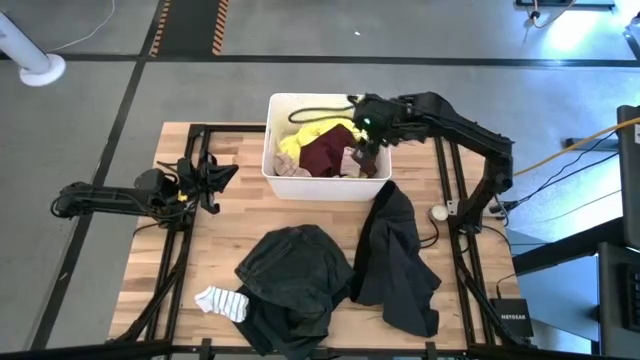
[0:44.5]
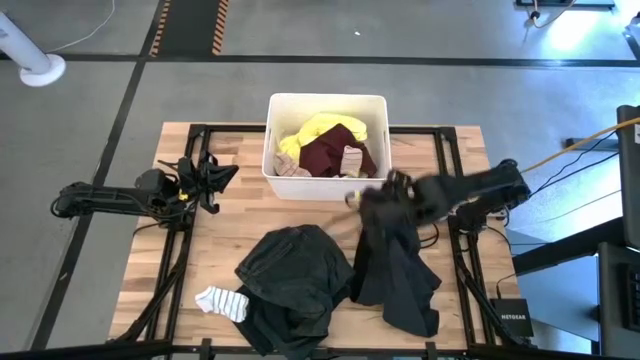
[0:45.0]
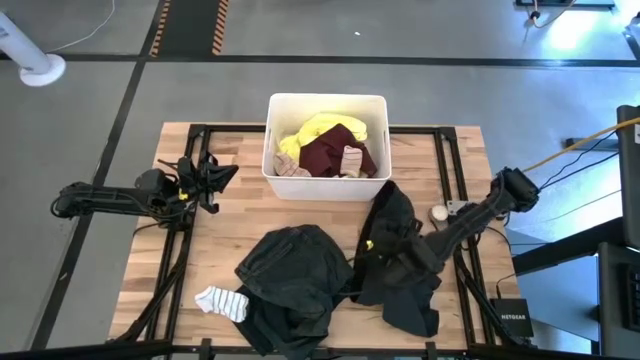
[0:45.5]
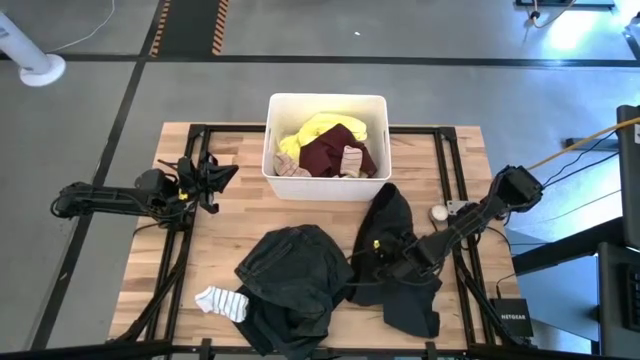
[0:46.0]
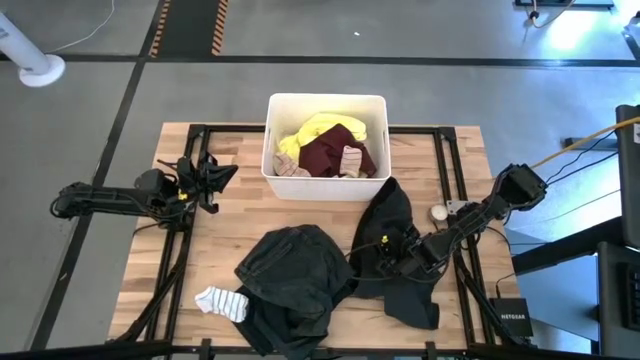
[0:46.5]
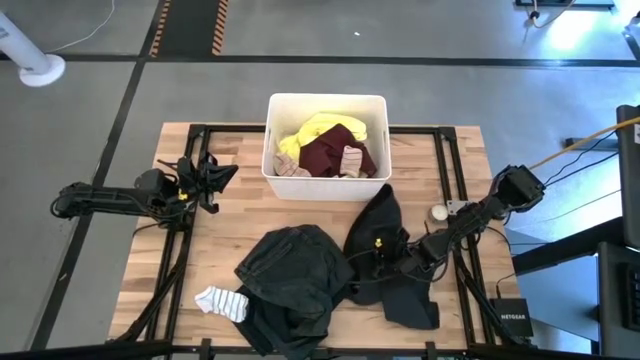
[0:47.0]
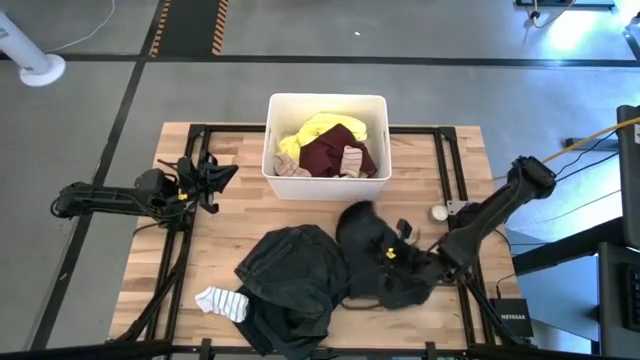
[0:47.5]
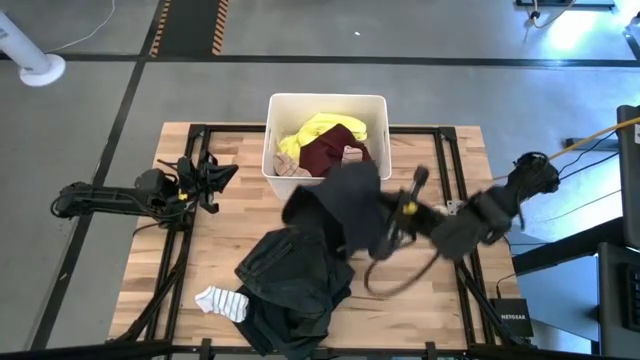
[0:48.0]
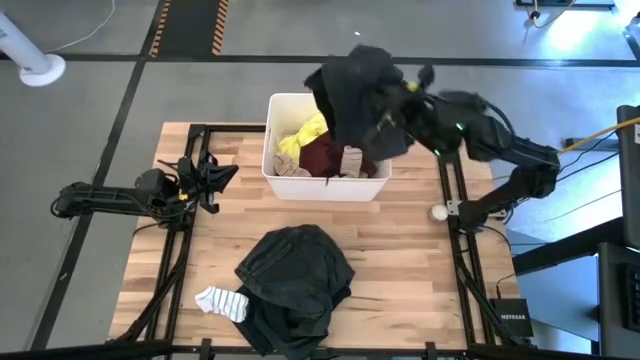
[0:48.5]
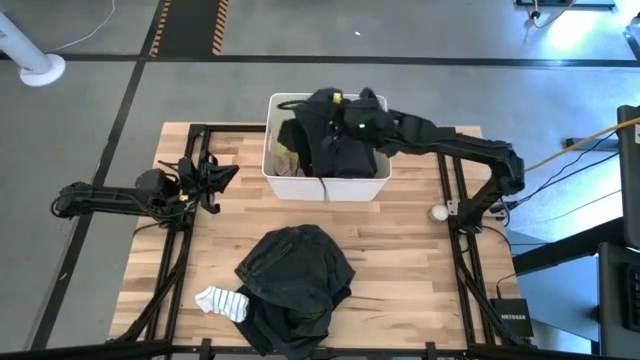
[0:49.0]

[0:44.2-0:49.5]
Task: Sort clothes
Put the black shorts into the white bin

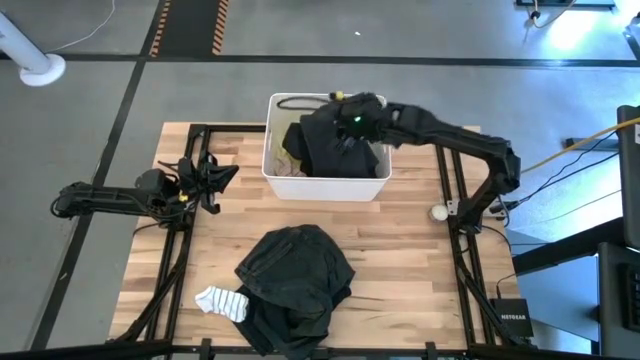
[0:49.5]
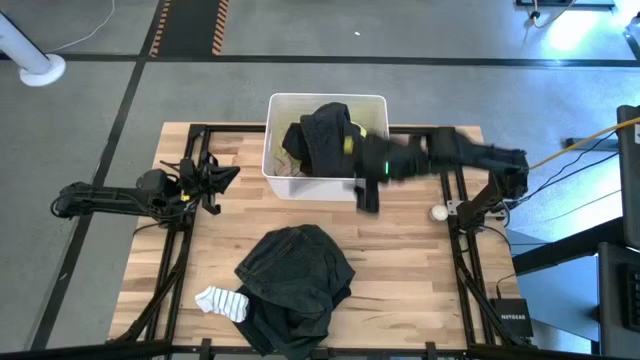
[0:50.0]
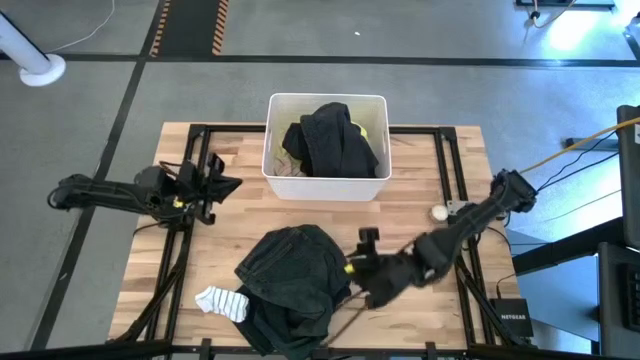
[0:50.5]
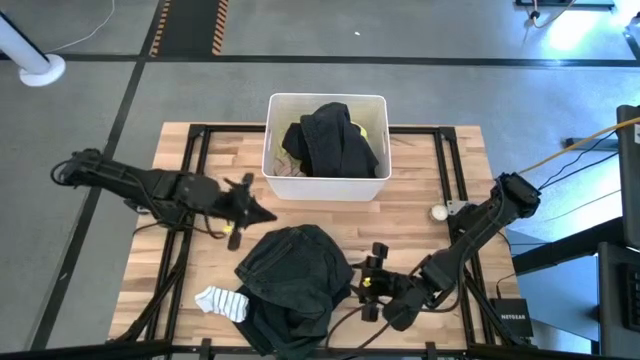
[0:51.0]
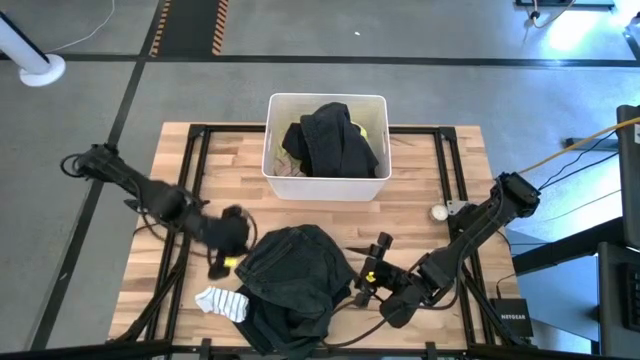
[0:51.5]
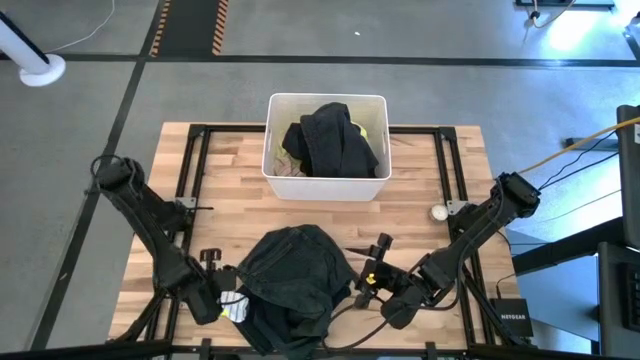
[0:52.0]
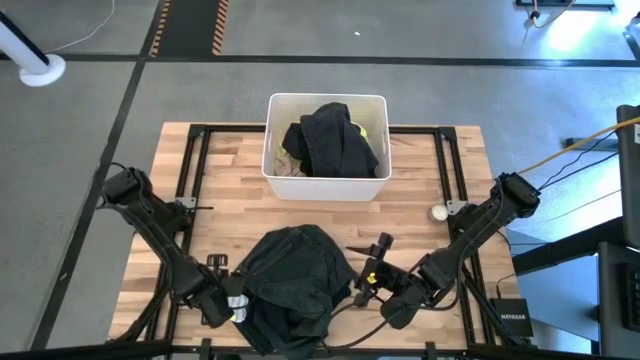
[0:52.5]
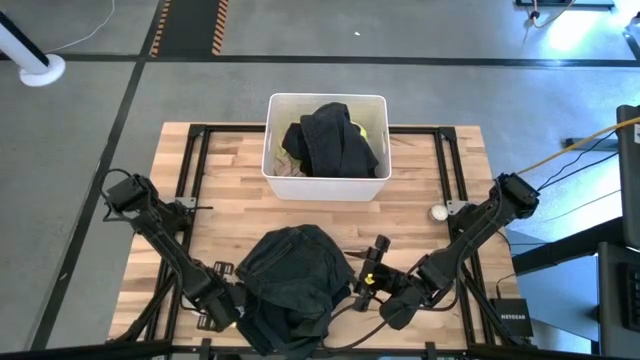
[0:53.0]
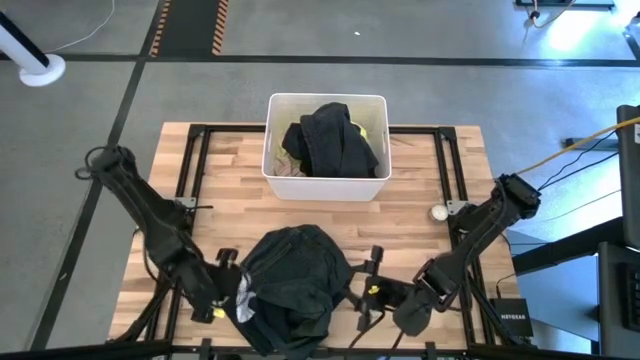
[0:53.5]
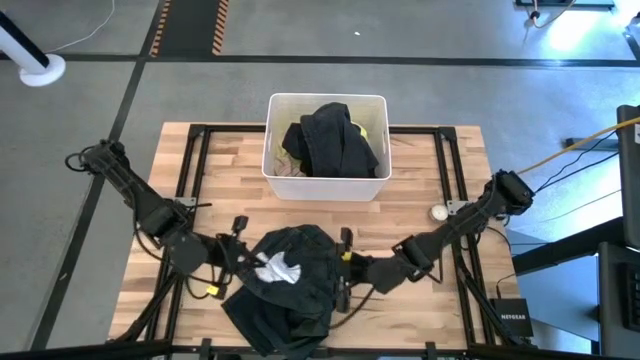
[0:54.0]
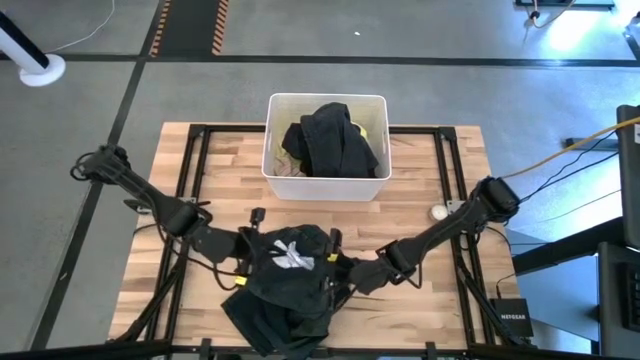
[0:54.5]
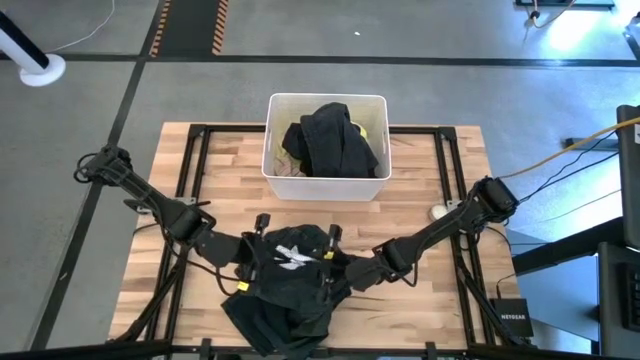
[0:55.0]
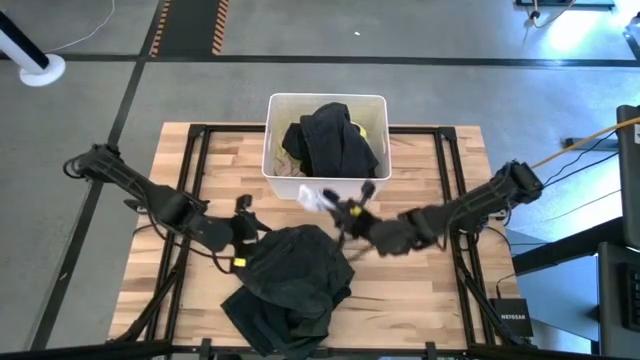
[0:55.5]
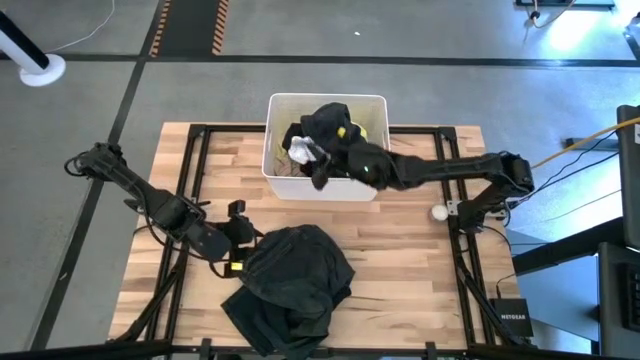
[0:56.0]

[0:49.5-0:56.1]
Put the white sock into the white bin

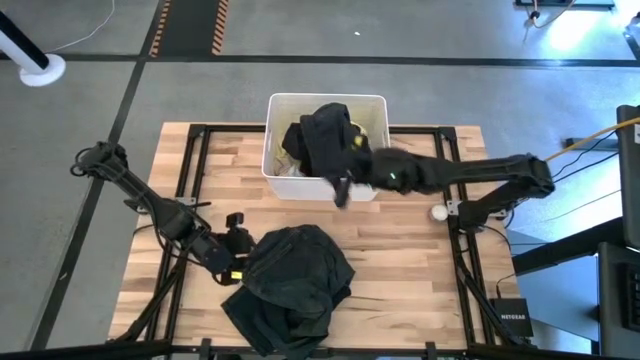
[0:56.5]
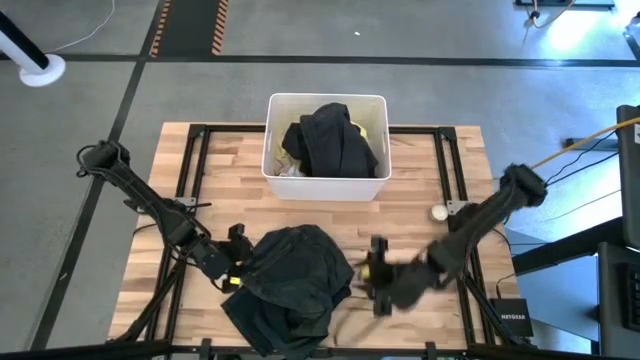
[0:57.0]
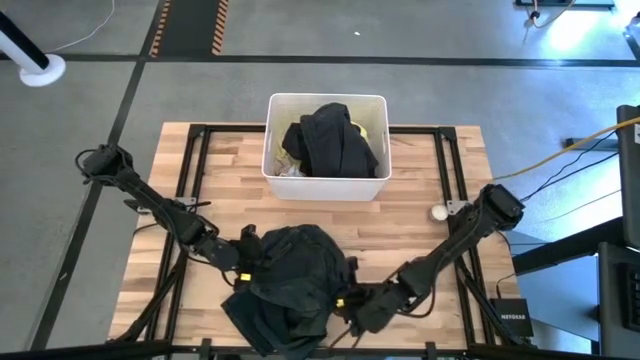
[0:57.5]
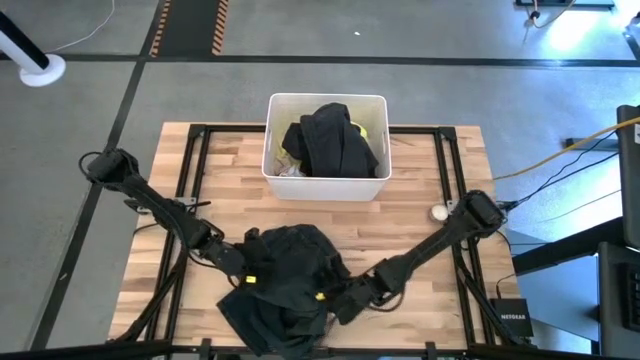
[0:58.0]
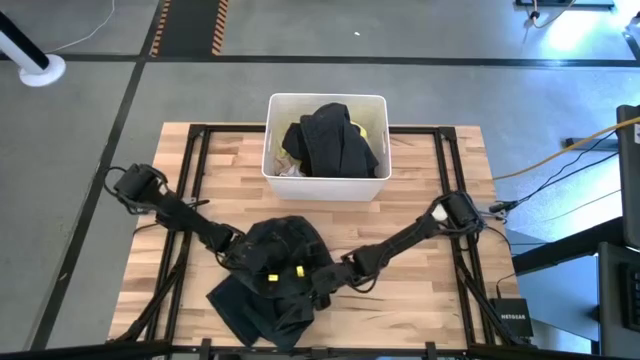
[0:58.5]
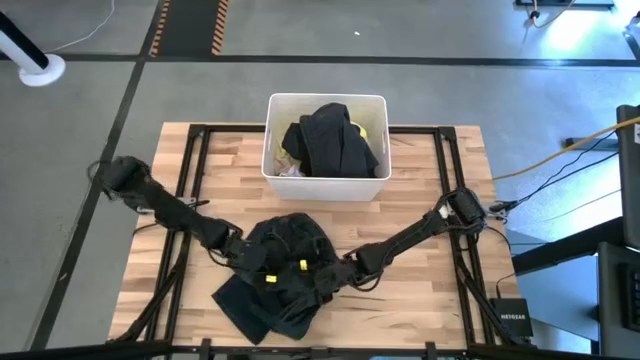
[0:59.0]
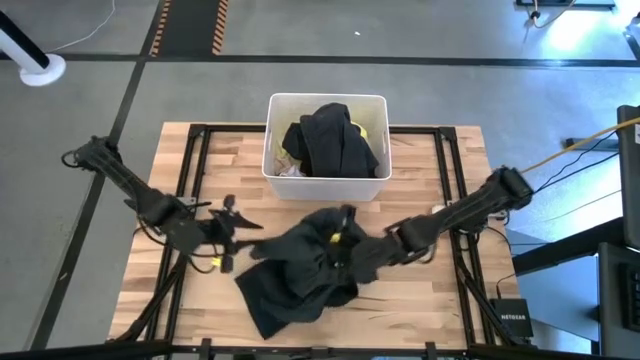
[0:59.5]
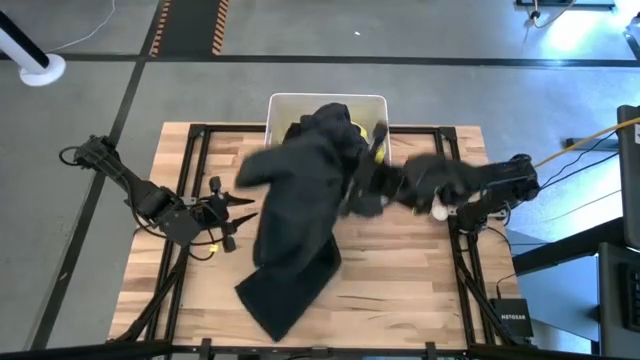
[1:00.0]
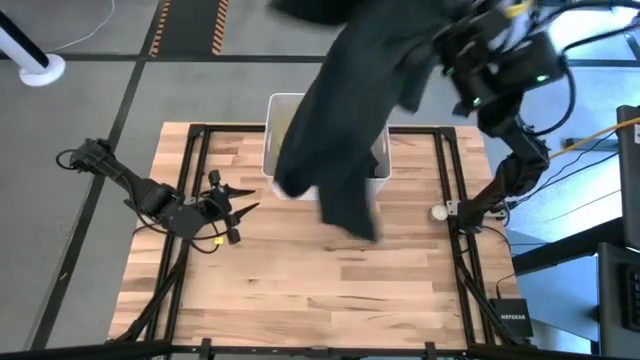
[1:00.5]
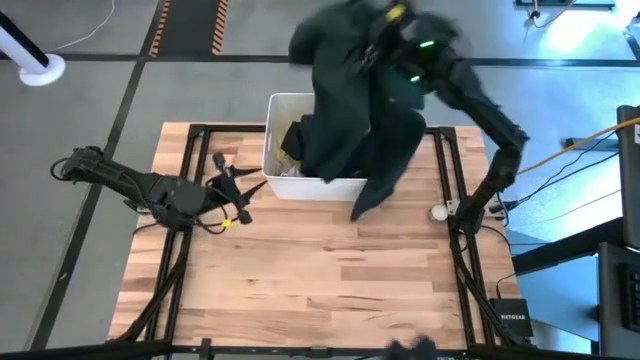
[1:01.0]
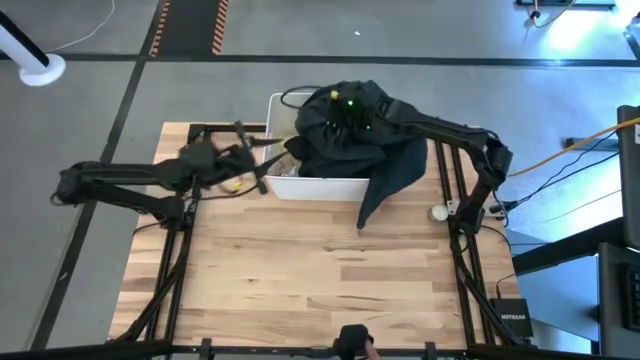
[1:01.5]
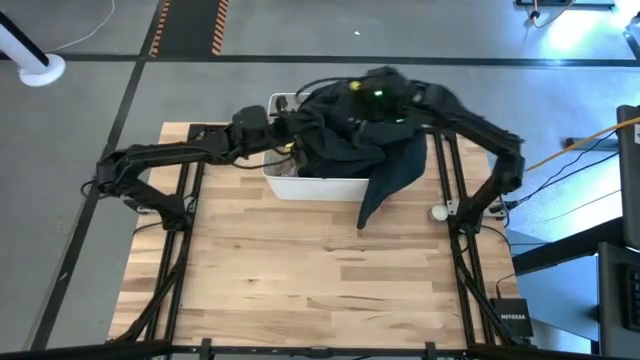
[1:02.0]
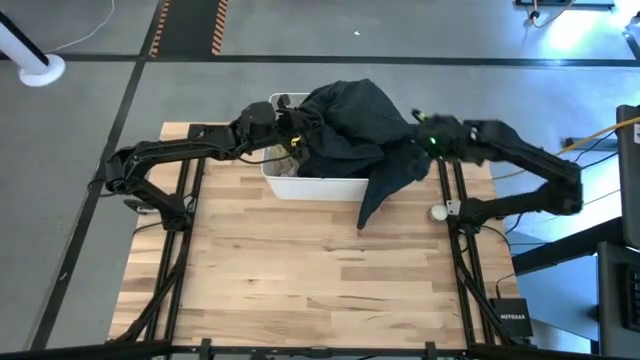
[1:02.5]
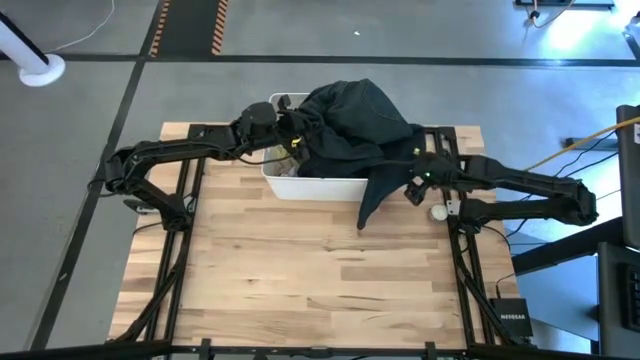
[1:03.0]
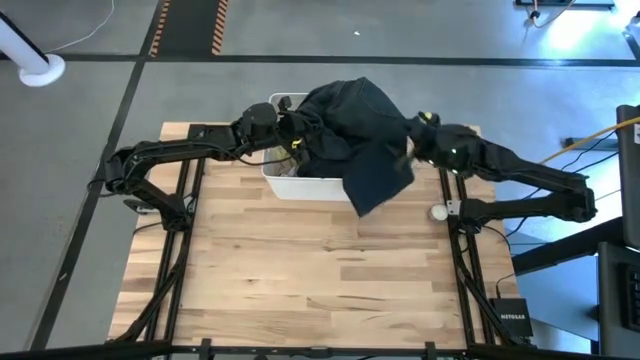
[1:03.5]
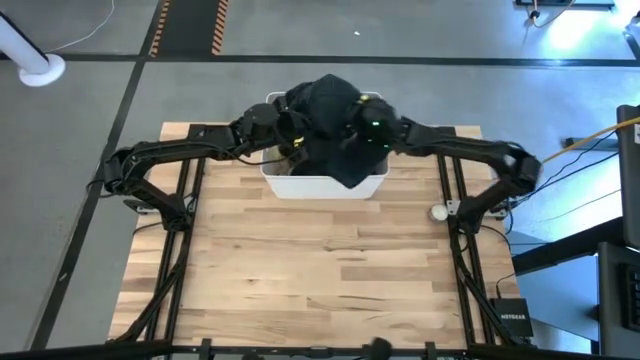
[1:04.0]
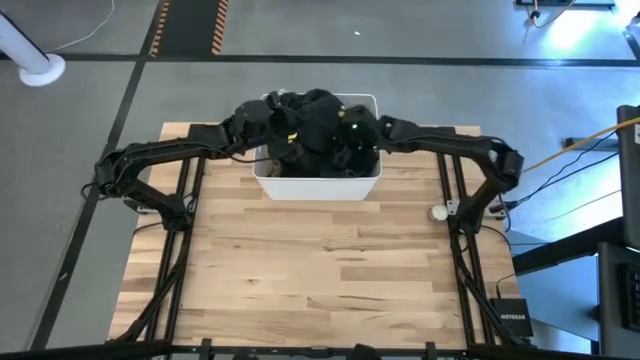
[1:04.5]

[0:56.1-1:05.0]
Put the black pants into the white bin
